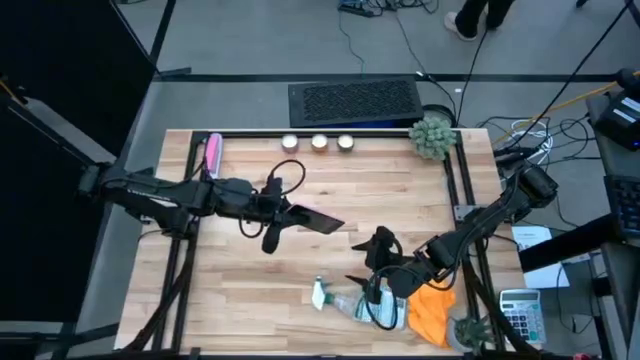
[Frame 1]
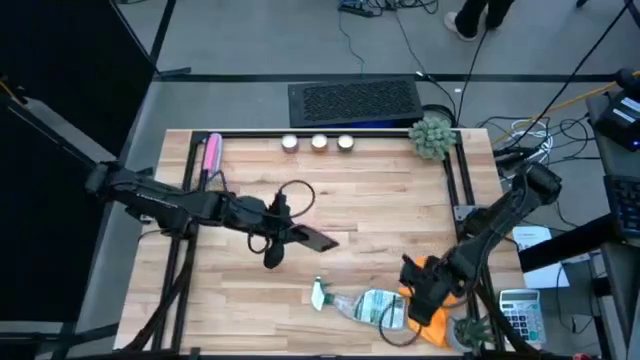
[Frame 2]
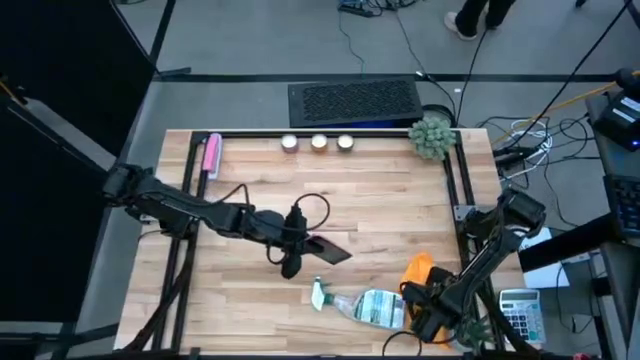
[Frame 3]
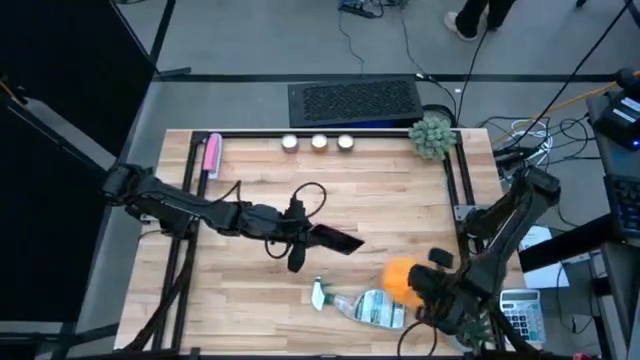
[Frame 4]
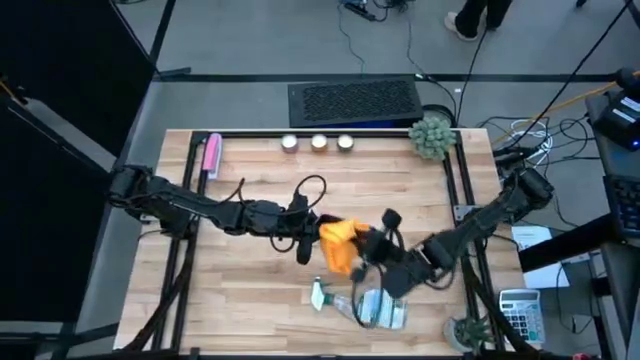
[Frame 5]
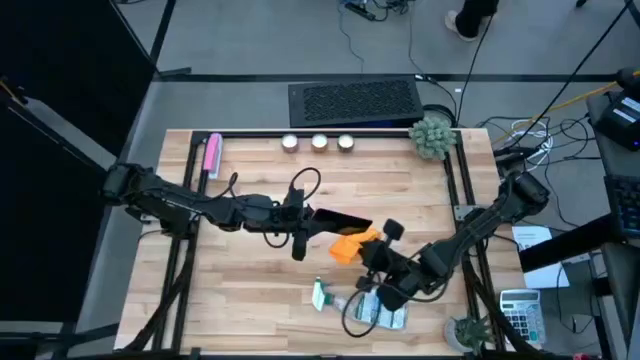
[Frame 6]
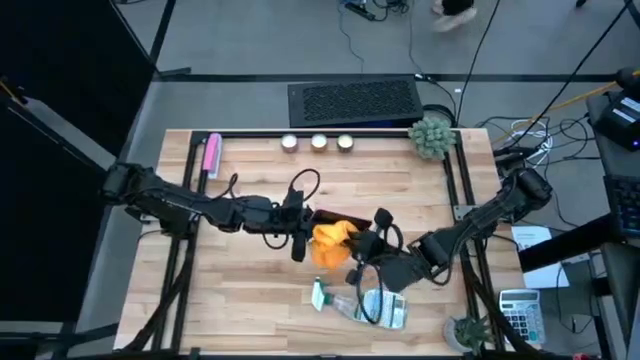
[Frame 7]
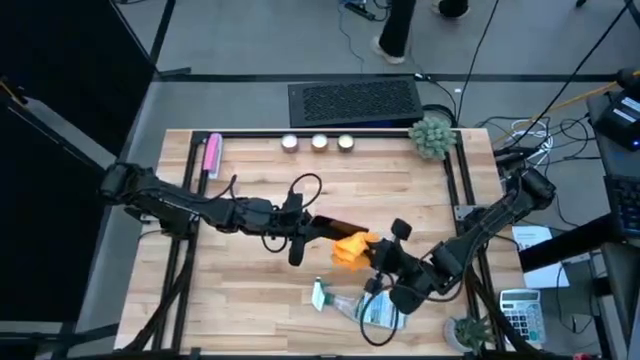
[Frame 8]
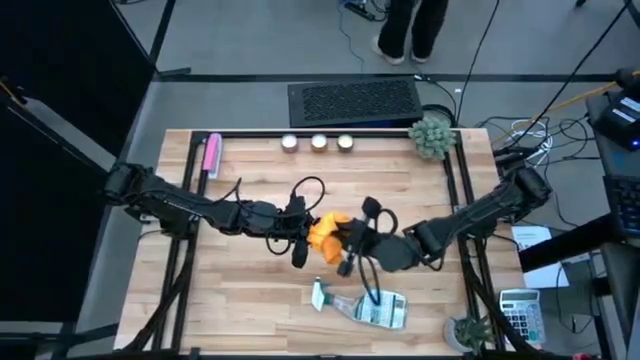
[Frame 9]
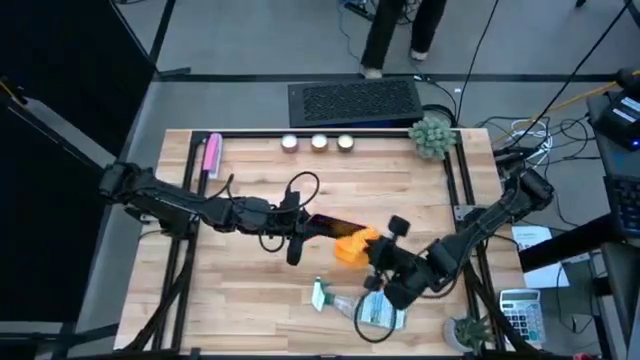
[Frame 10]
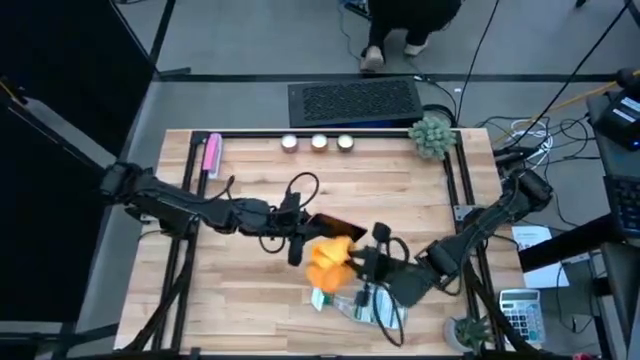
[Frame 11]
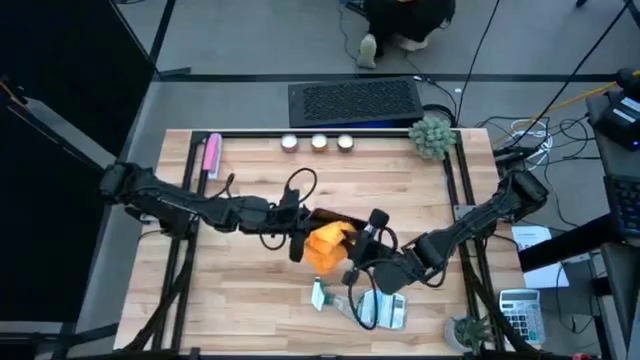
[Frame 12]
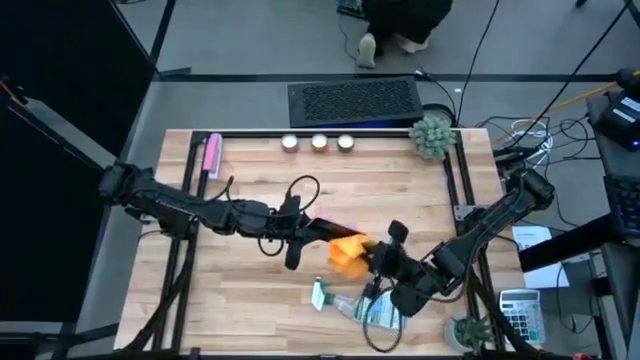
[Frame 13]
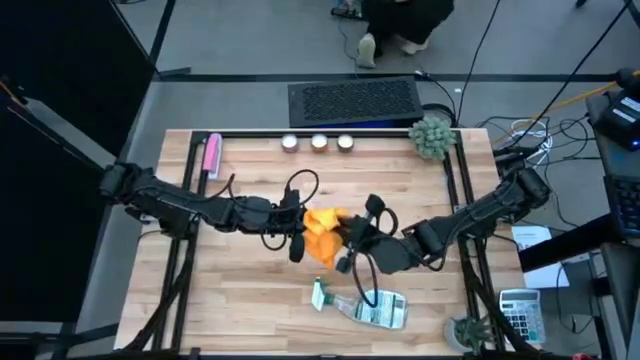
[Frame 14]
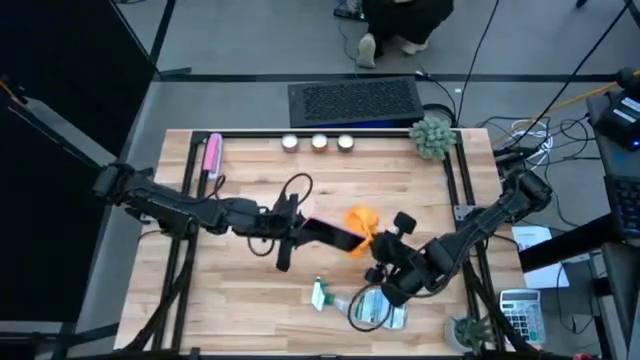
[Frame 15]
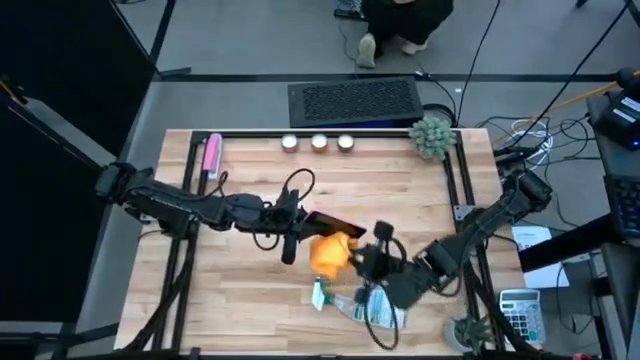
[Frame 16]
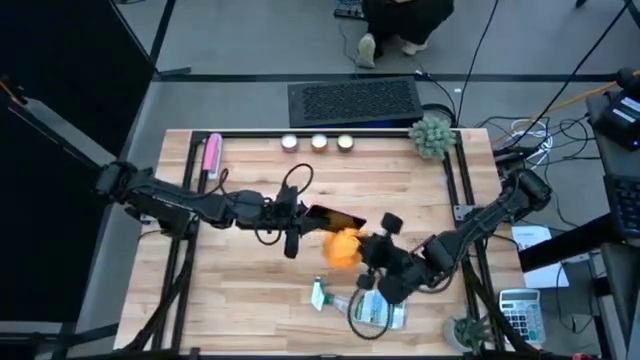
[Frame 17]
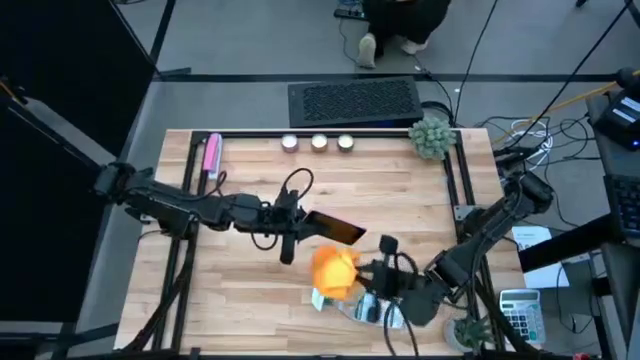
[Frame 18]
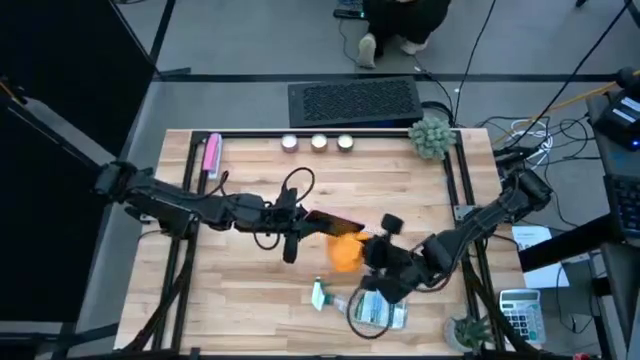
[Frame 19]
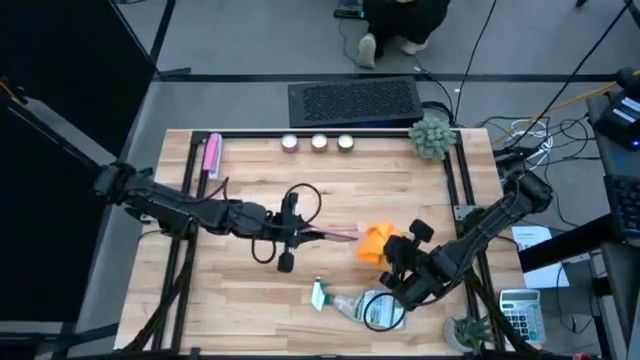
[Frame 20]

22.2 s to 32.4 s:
Task: Apply microfiber cloth
Wipe the front of the cellphone with the microfiber cloth

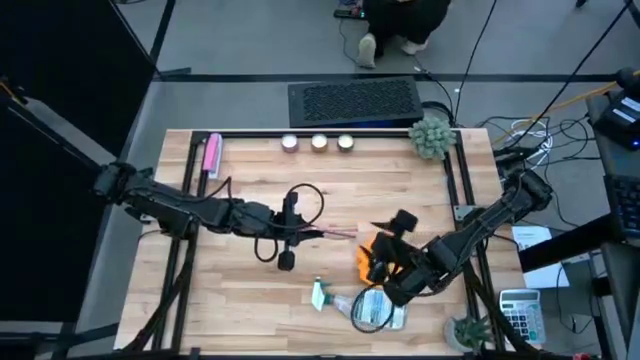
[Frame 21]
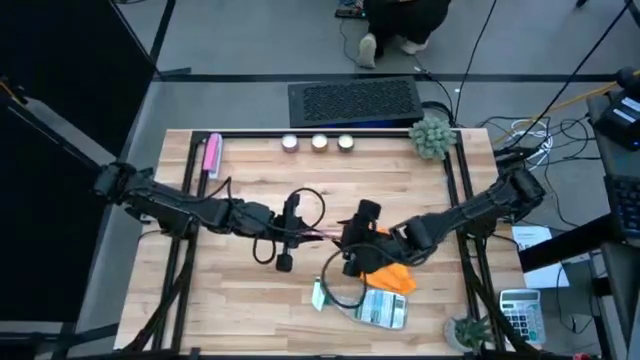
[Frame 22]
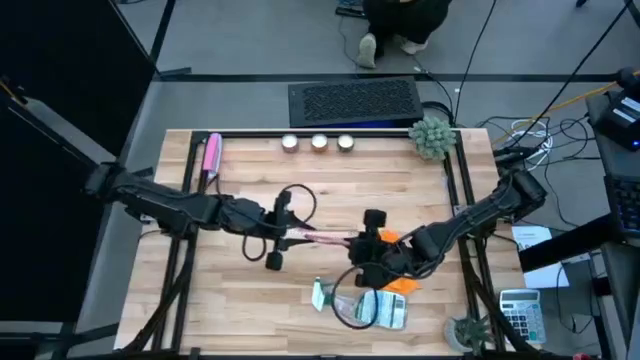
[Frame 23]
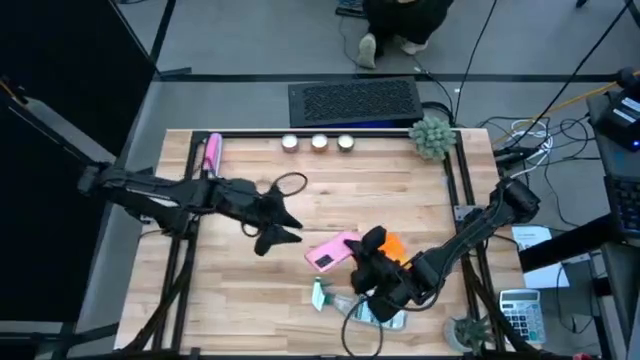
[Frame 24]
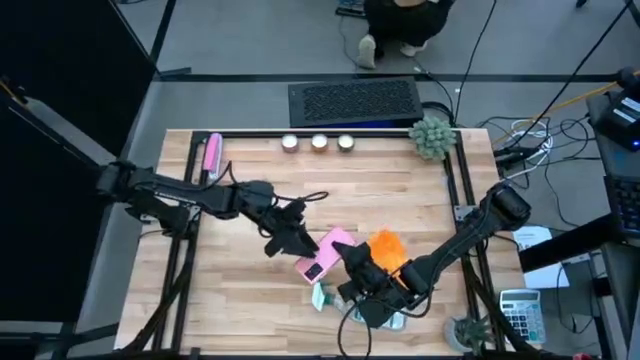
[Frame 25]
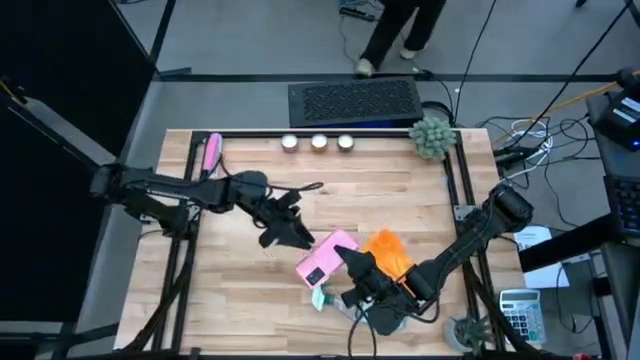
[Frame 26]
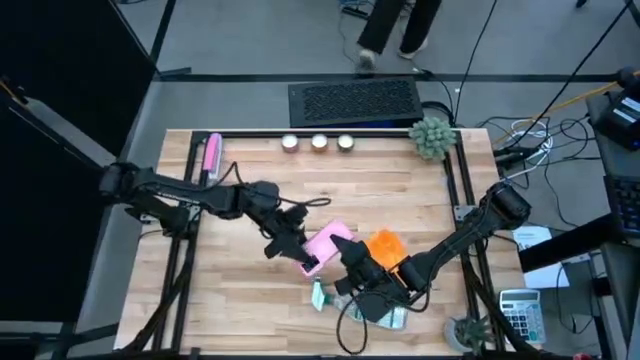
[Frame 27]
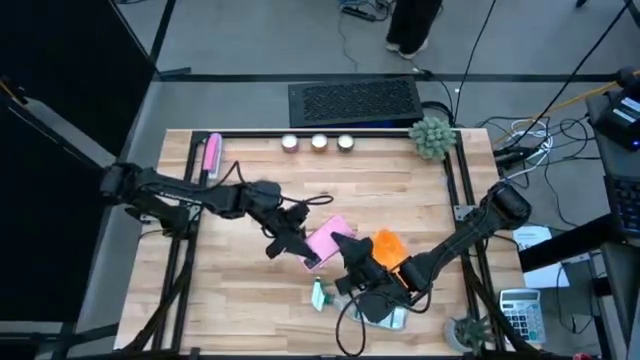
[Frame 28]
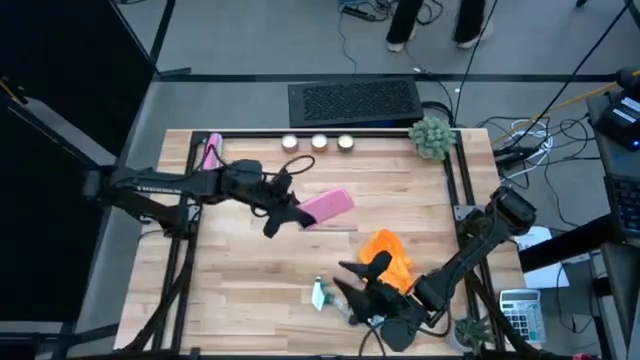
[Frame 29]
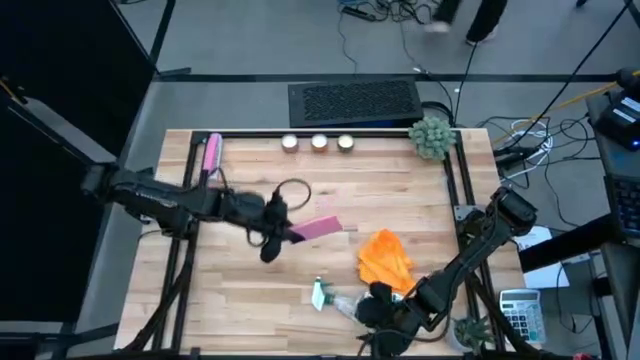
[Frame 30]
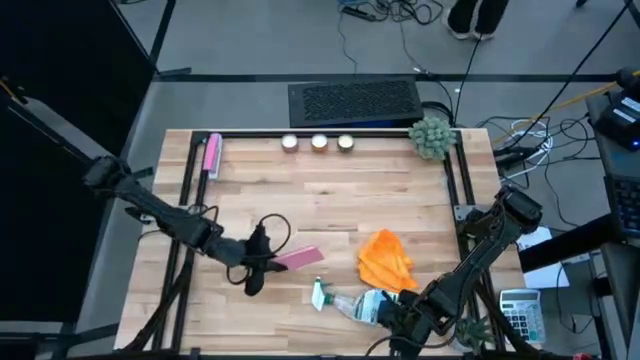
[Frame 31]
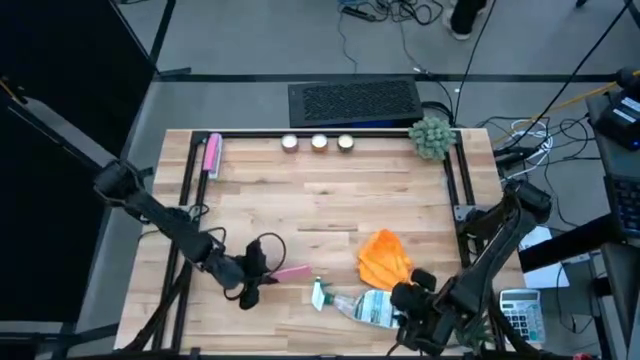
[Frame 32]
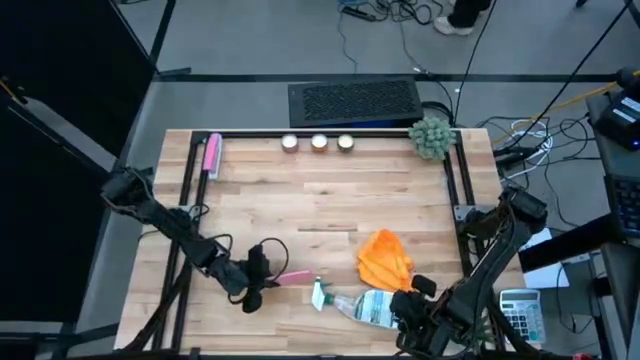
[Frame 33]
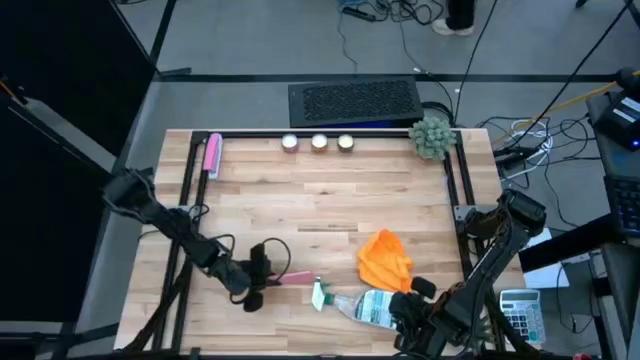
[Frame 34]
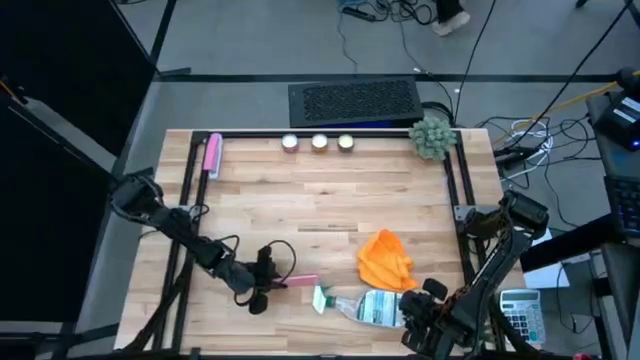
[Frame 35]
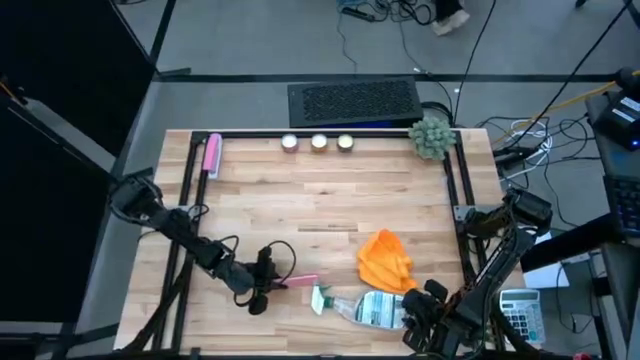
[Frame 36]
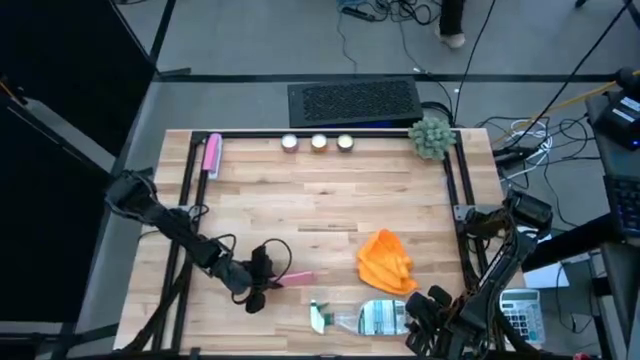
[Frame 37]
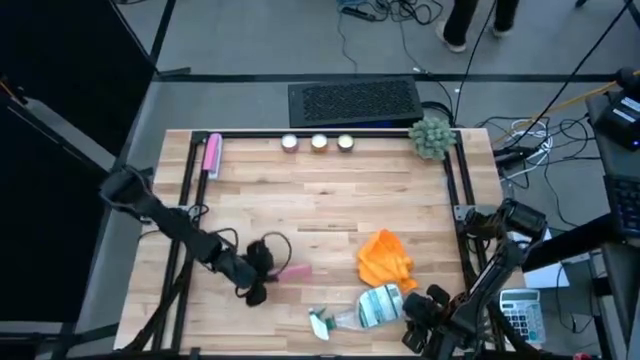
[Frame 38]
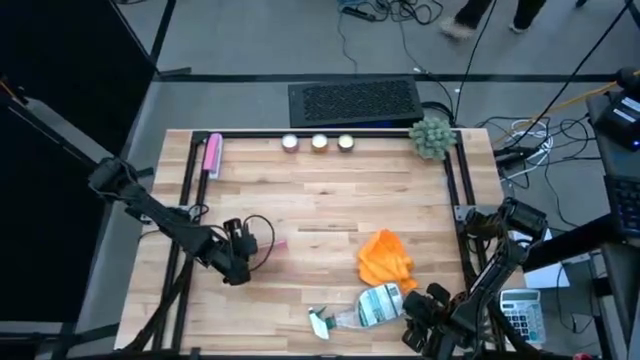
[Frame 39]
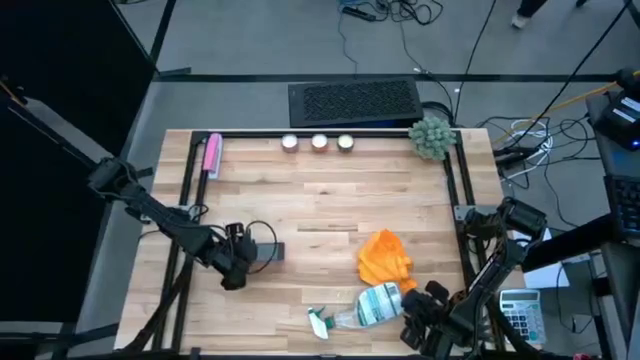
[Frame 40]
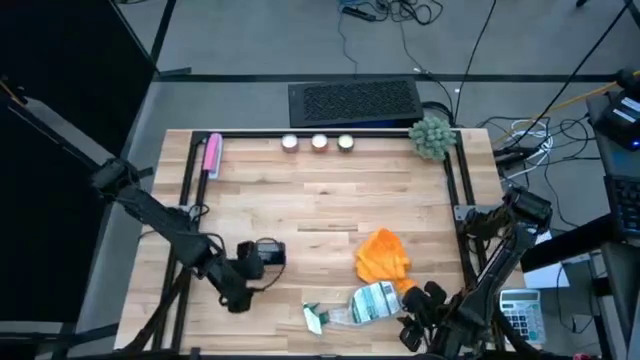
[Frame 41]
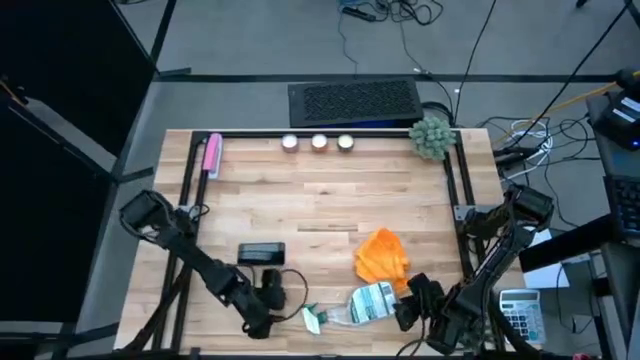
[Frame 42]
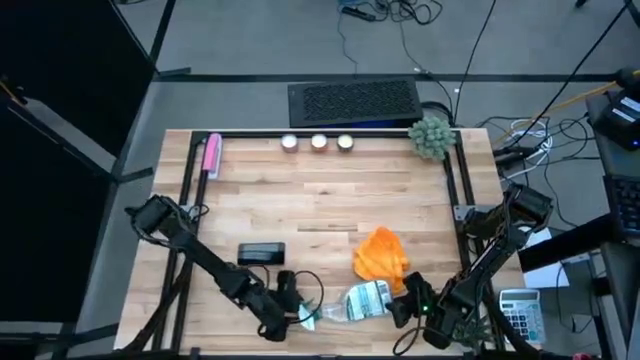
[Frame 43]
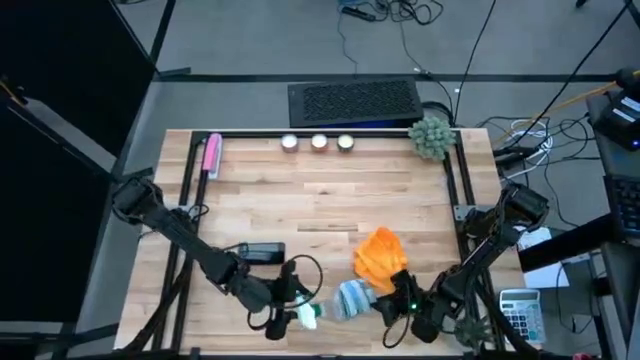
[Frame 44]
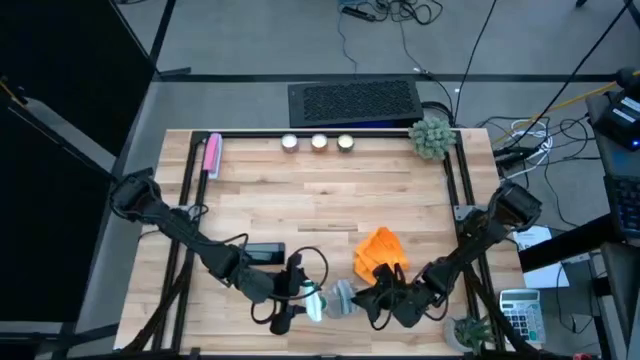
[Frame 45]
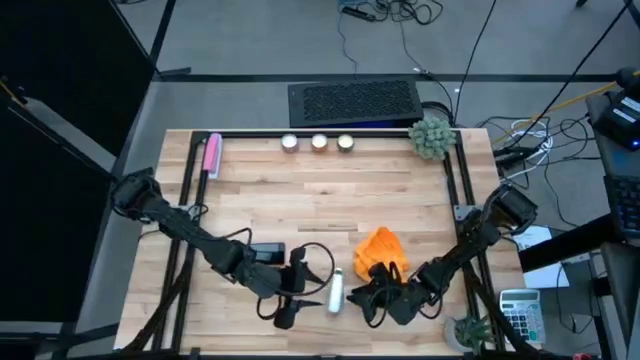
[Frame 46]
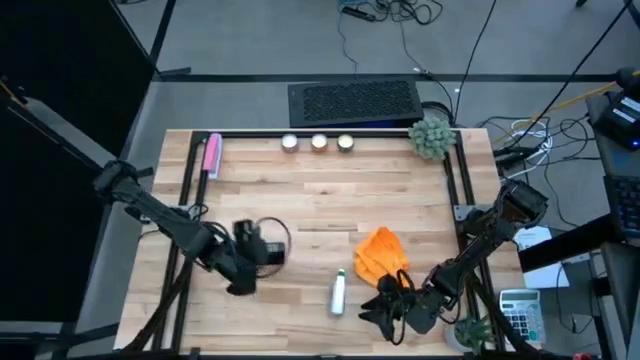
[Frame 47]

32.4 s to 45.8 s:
Spray the back of the cellphone using the spray bottle
